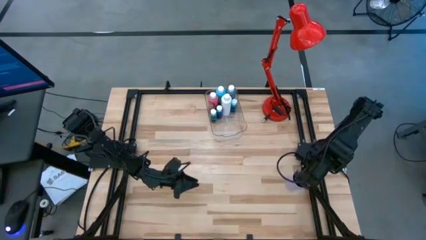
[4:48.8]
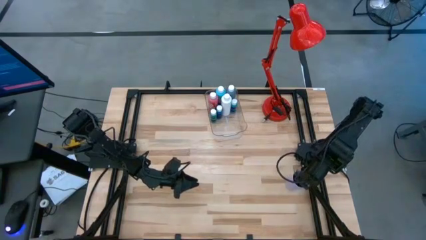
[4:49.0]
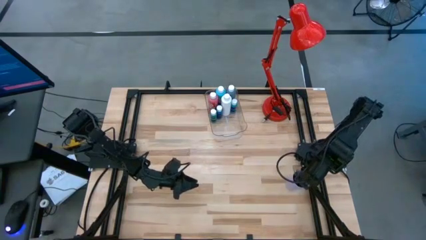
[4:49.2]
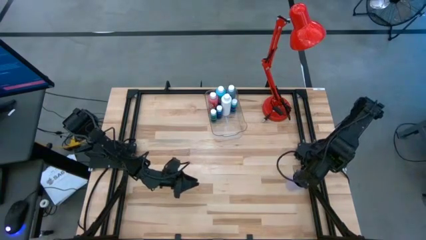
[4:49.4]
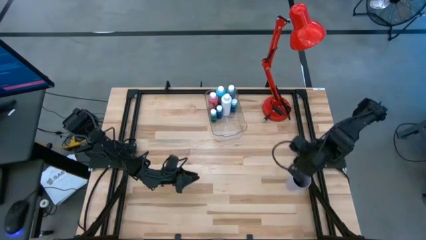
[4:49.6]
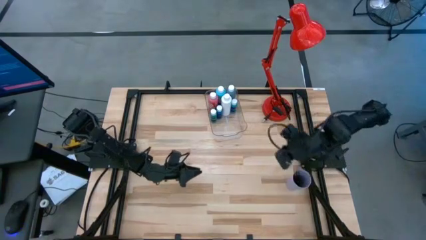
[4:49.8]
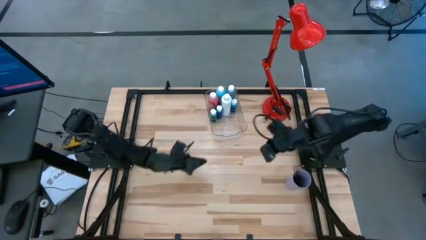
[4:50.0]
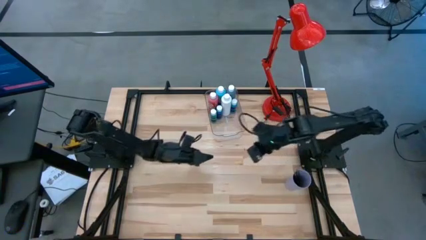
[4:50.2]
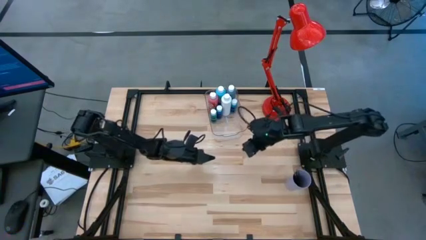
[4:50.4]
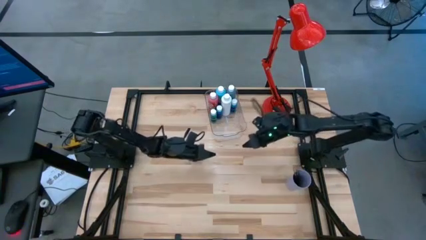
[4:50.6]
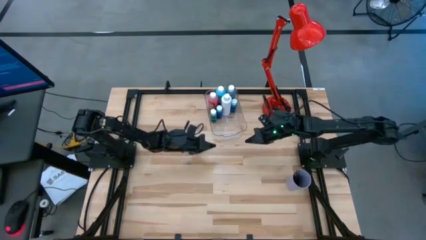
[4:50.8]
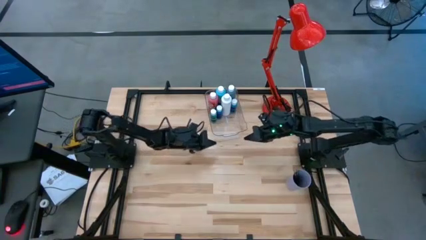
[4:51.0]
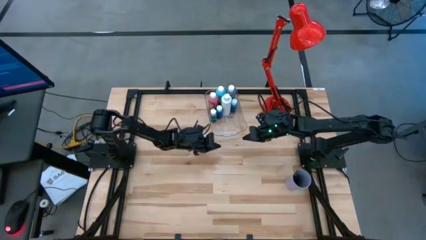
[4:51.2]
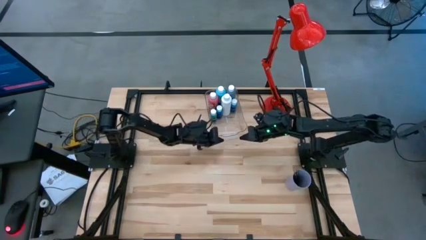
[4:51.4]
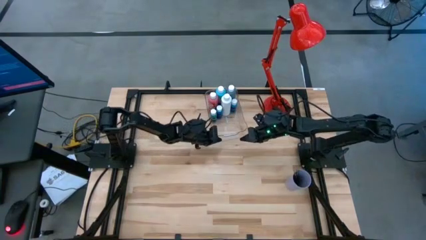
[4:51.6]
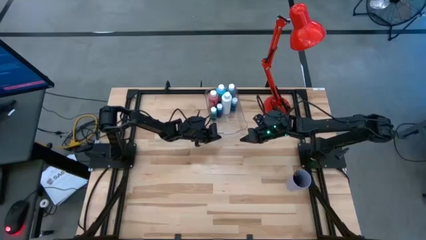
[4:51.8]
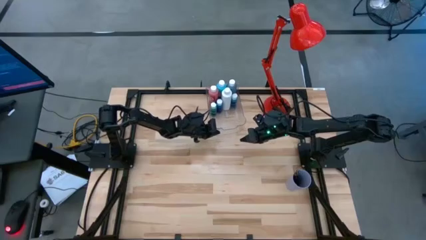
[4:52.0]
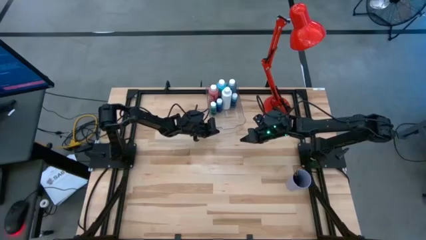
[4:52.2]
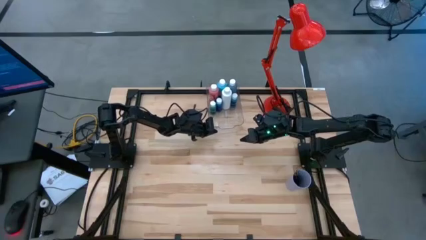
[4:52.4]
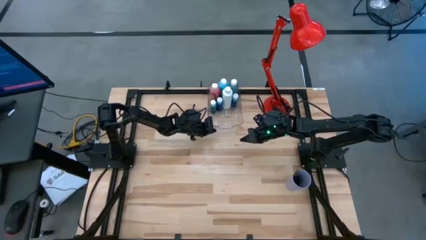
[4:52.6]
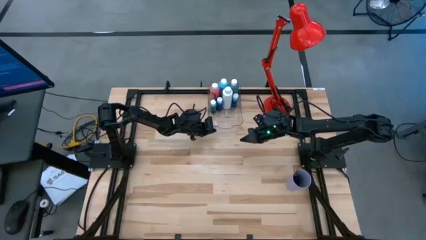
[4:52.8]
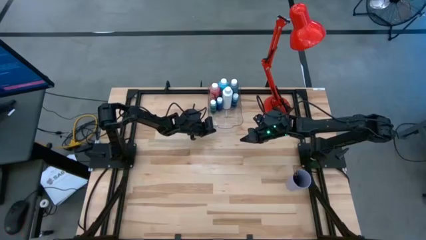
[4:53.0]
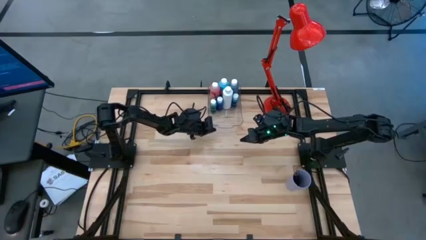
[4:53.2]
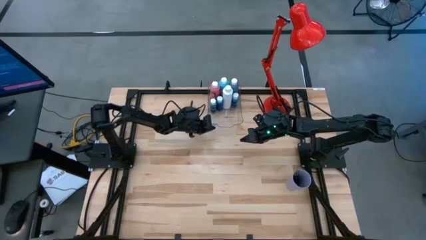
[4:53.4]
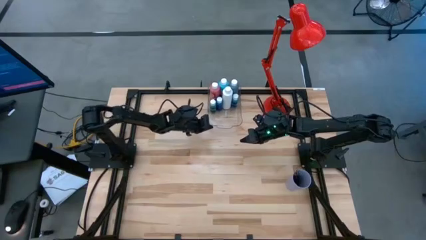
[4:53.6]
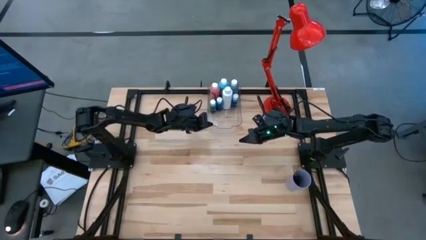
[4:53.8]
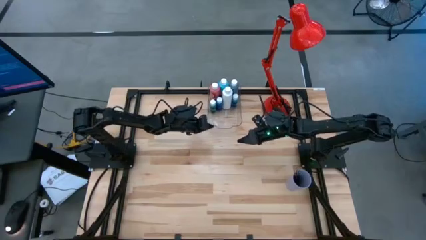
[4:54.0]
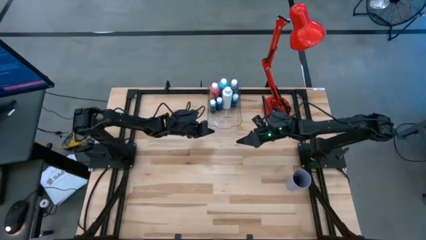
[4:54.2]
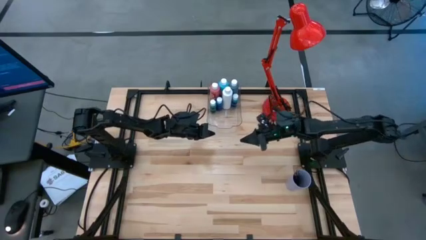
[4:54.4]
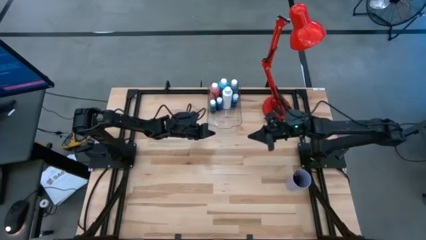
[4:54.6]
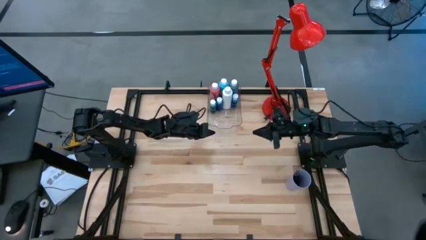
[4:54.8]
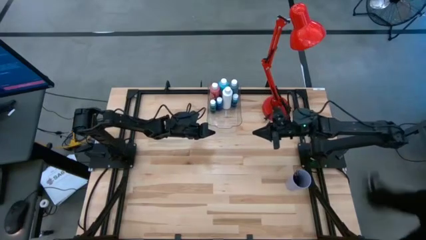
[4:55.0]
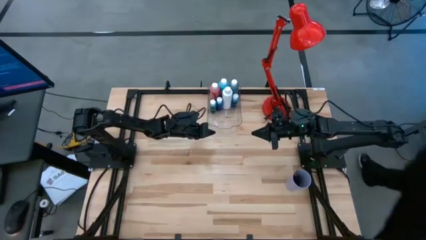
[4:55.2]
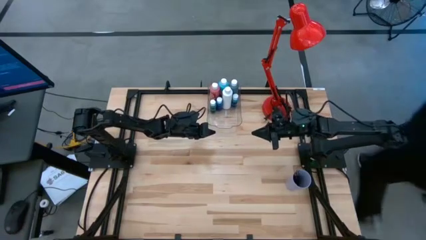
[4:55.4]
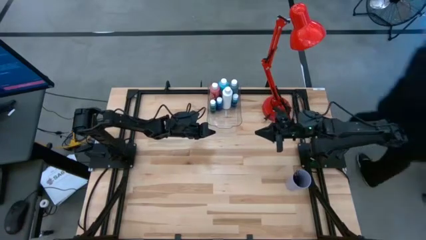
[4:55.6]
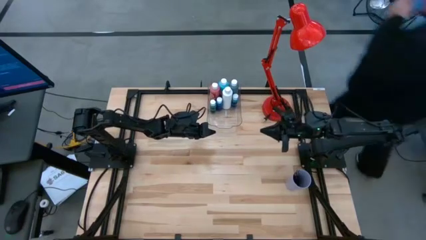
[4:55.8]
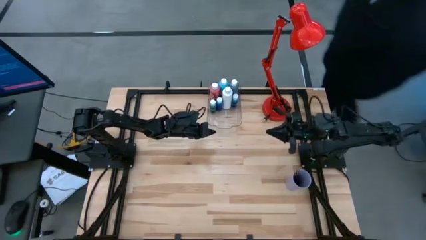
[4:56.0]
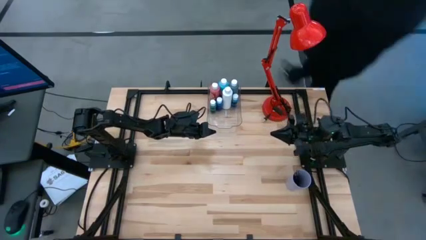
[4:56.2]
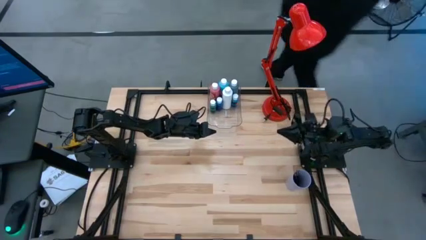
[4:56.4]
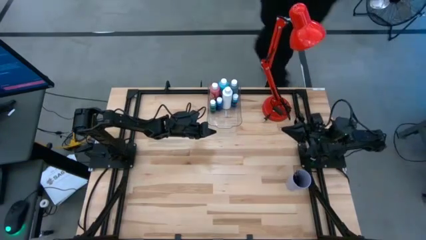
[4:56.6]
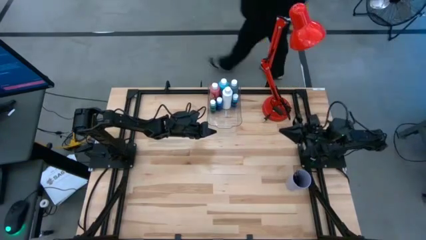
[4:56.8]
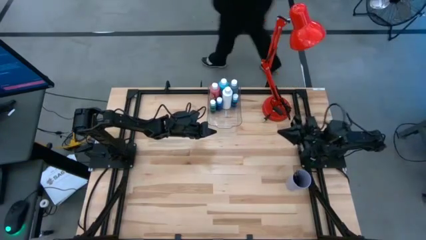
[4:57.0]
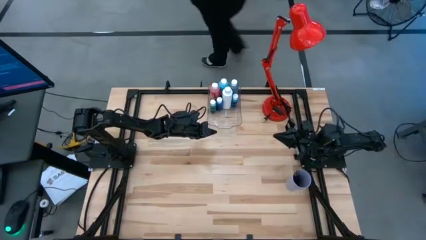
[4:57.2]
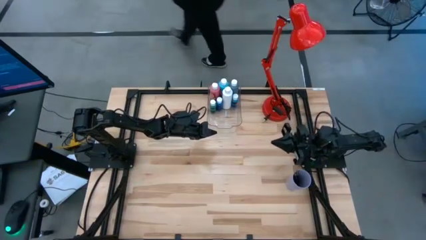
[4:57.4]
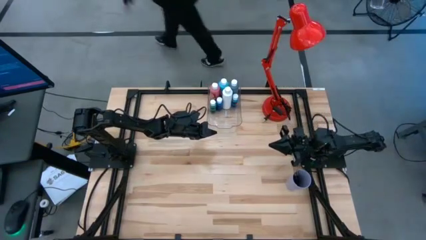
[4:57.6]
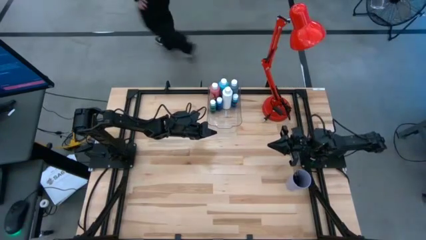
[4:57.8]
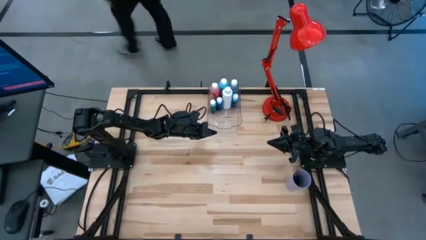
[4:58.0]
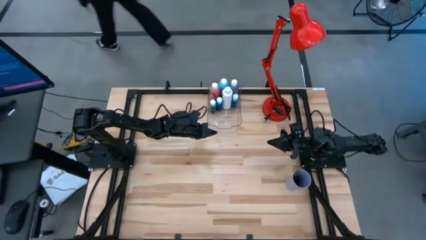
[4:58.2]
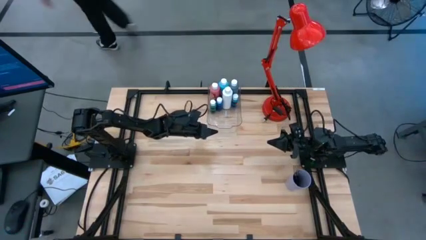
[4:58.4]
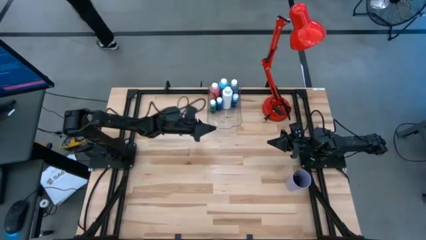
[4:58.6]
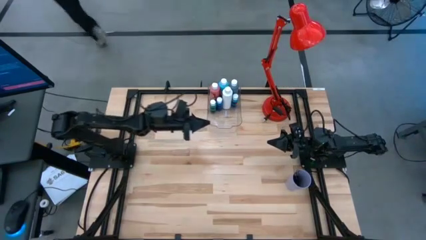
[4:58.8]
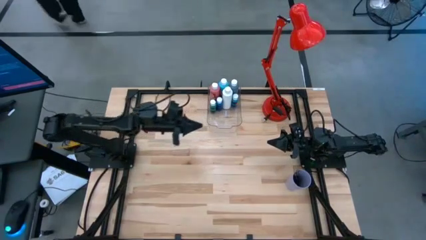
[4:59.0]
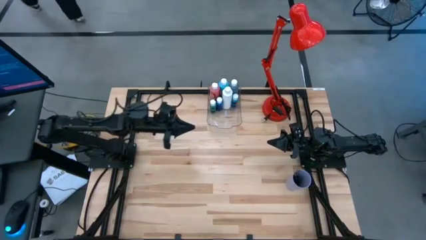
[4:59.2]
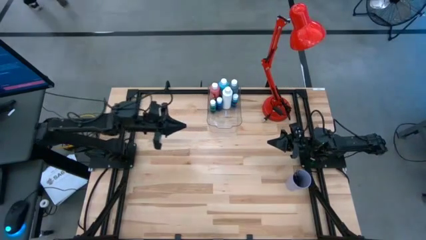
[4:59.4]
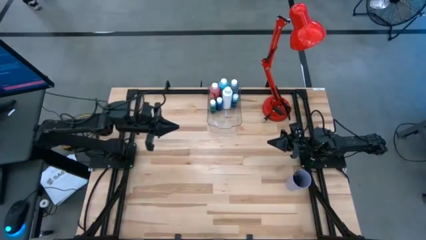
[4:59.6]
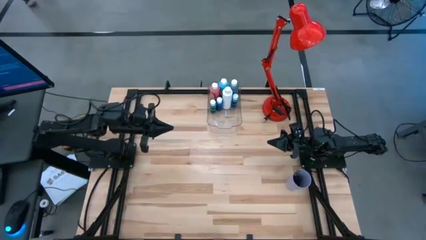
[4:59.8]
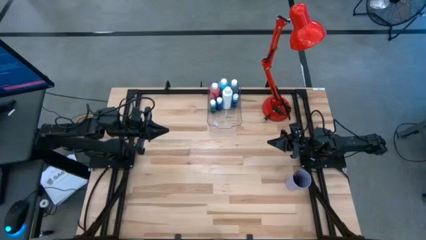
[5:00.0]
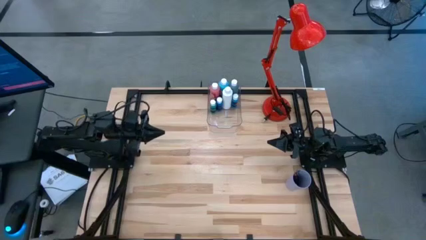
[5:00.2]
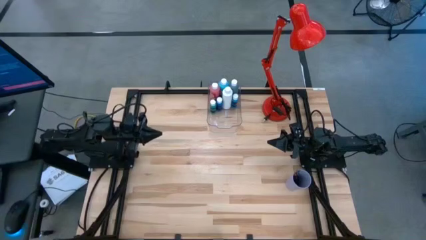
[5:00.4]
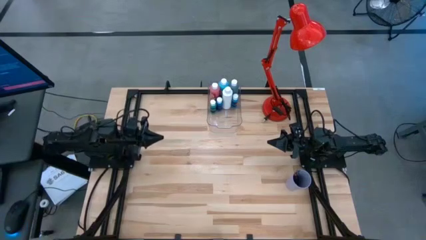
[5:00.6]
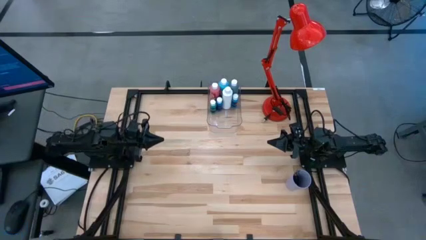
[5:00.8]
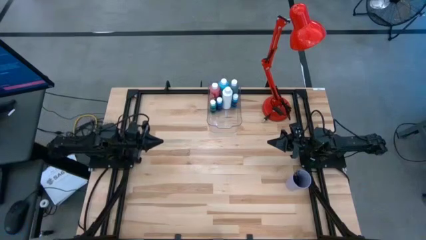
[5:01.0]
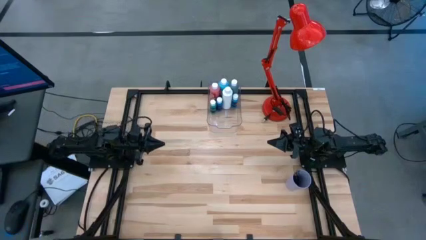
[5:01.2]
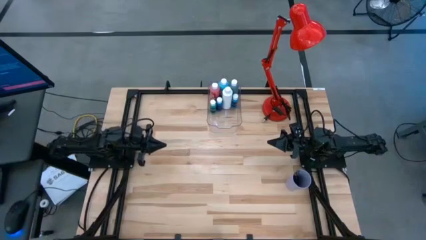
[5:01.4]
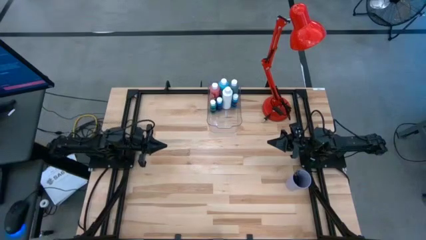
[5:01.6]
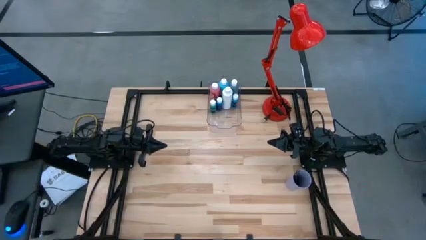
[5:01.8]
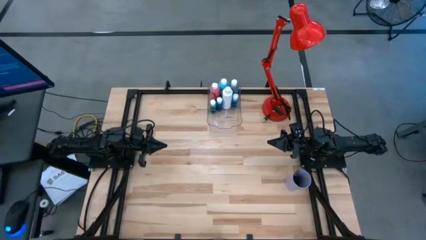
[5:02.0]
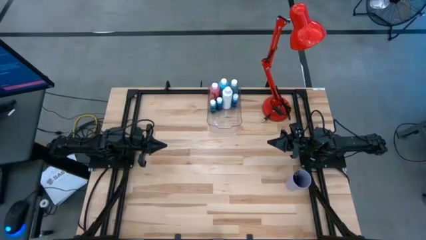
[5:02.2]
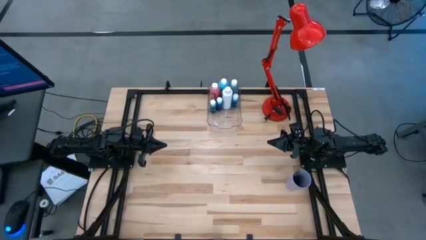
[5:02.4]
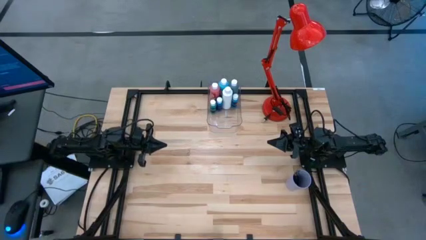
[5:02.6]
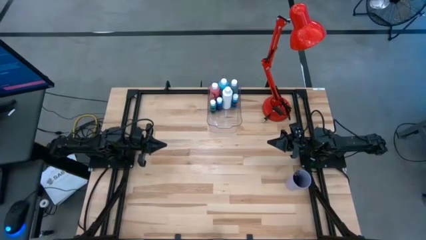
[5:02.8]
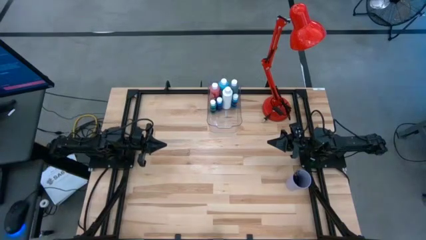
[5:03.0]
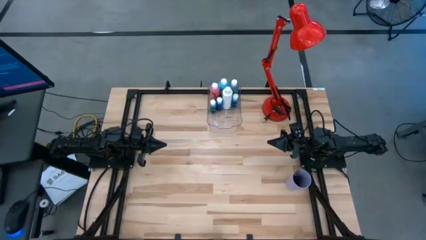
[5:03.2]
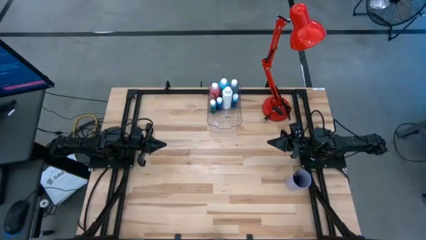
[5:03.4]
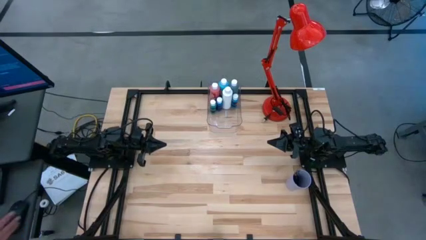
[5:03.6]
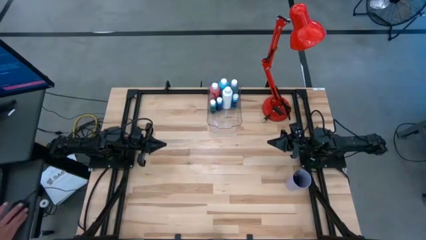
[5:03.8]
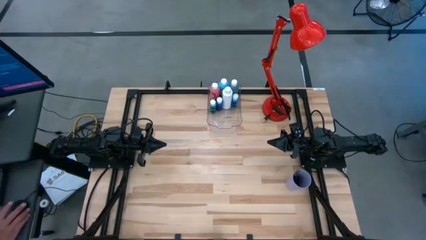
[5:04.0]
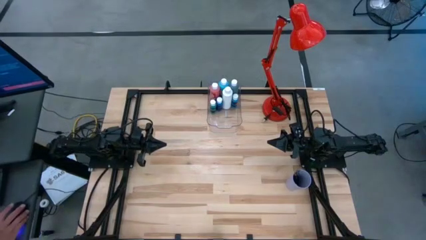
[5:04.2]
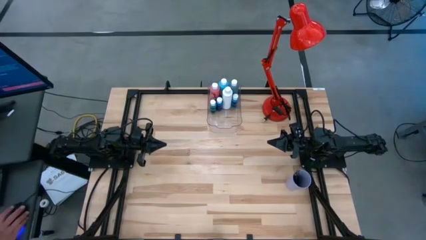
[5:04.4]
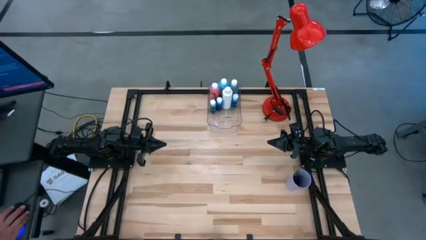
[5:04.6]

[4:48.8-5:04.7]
Task: Pick & Place Paint Supplies
Return to Home Position
